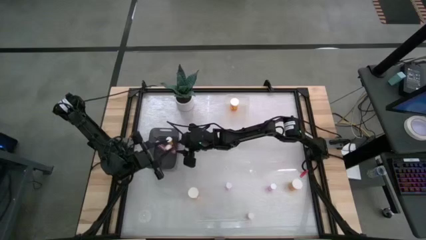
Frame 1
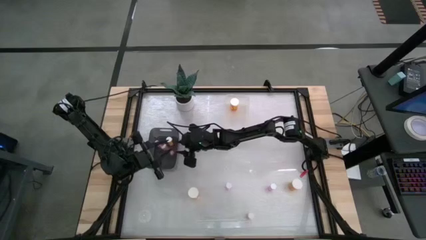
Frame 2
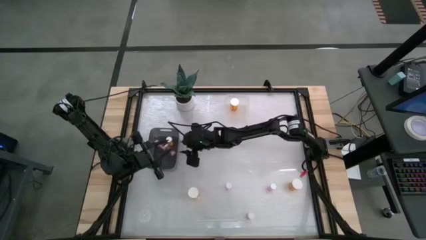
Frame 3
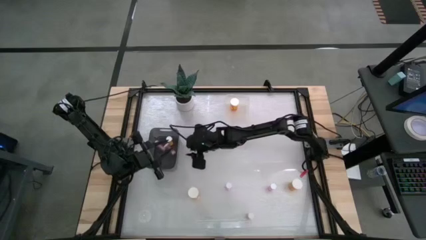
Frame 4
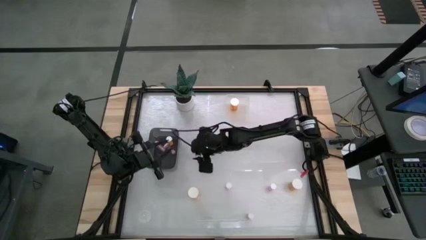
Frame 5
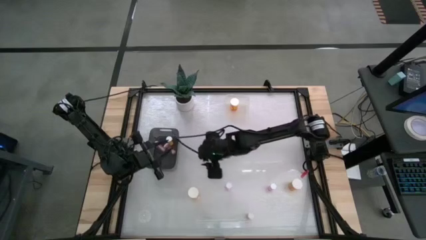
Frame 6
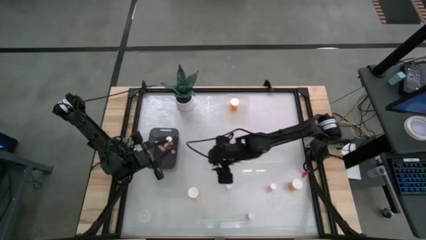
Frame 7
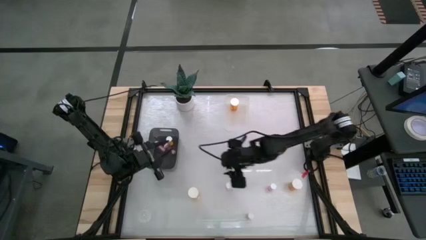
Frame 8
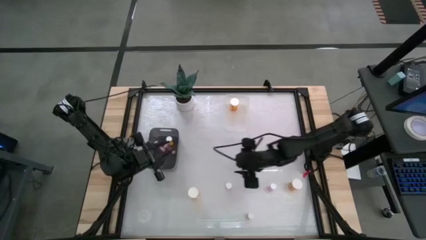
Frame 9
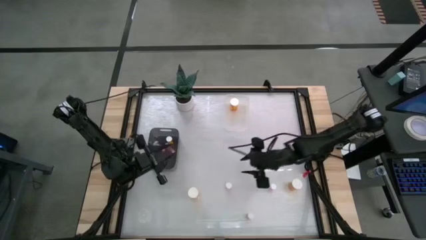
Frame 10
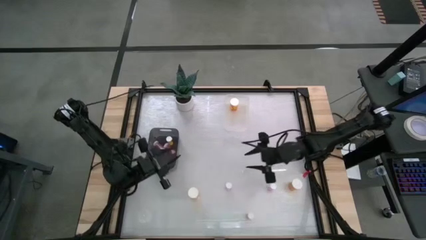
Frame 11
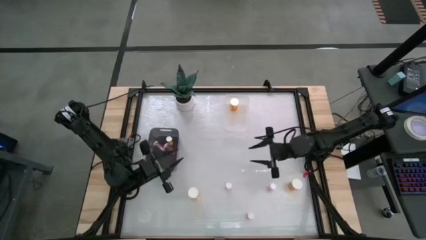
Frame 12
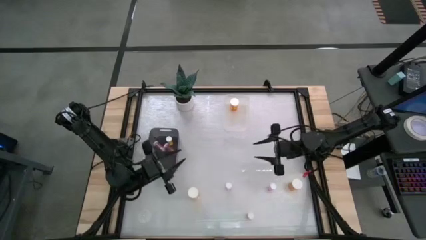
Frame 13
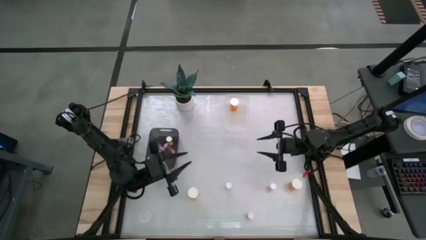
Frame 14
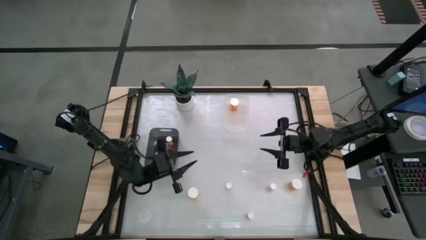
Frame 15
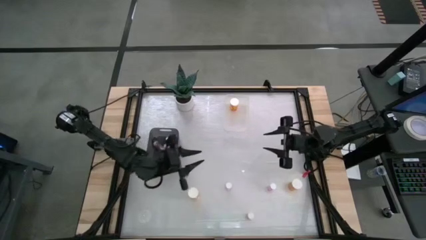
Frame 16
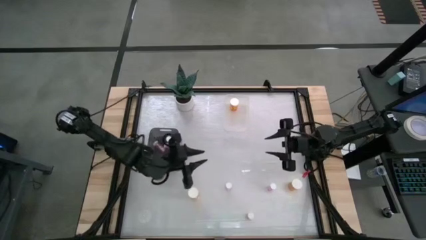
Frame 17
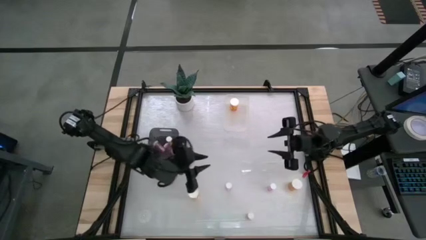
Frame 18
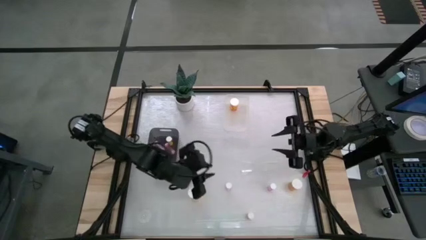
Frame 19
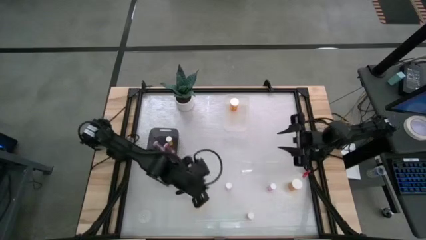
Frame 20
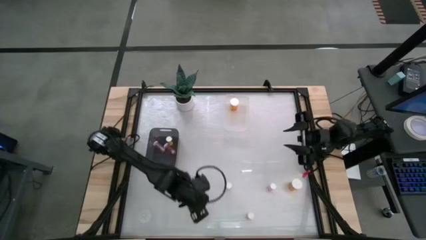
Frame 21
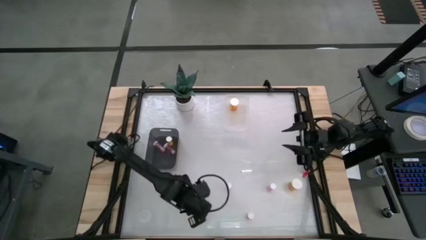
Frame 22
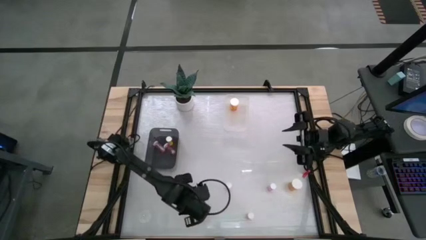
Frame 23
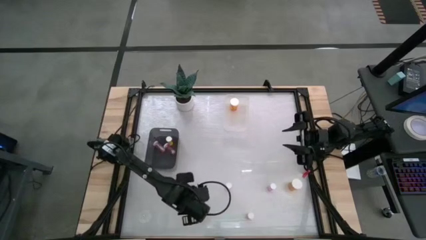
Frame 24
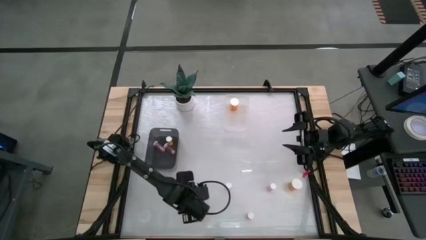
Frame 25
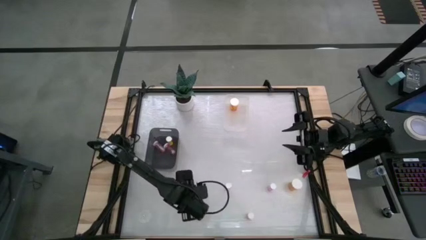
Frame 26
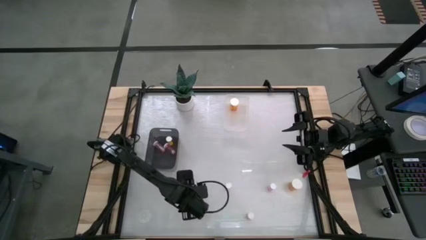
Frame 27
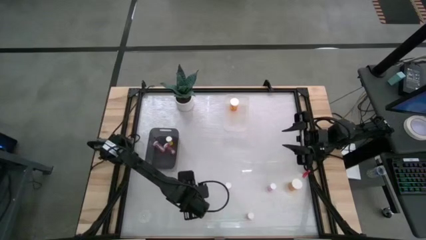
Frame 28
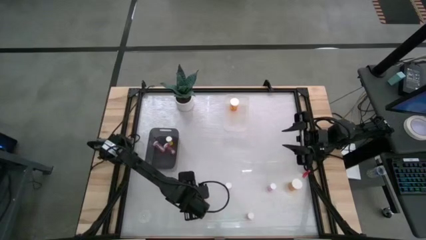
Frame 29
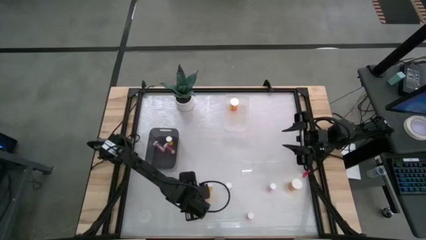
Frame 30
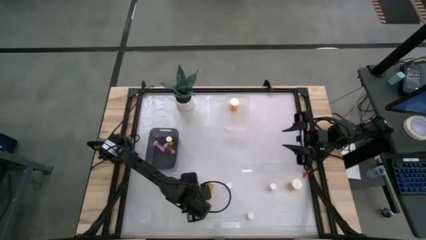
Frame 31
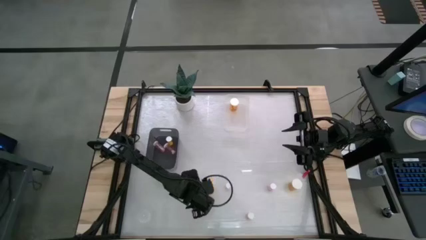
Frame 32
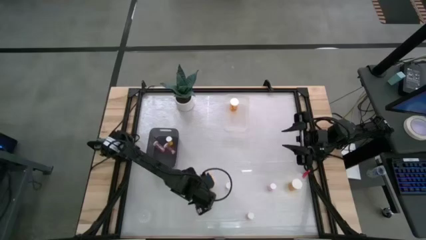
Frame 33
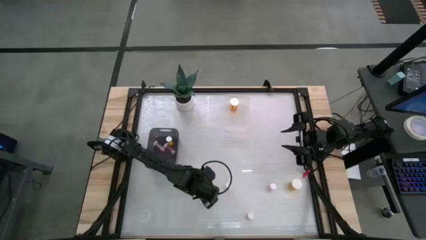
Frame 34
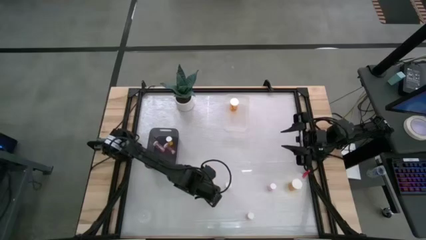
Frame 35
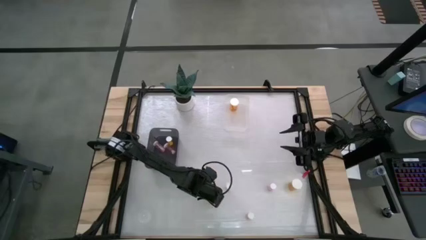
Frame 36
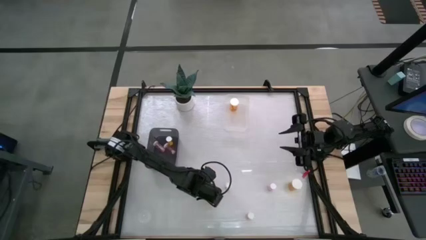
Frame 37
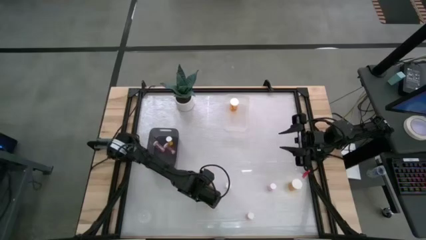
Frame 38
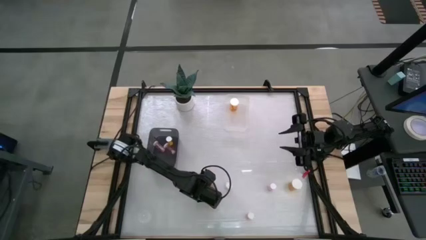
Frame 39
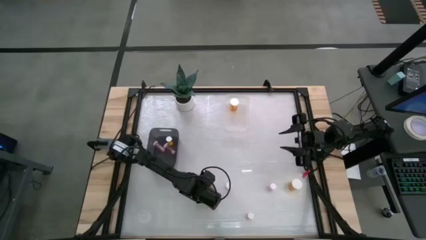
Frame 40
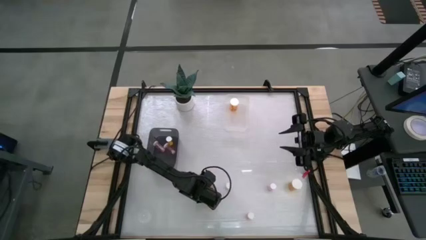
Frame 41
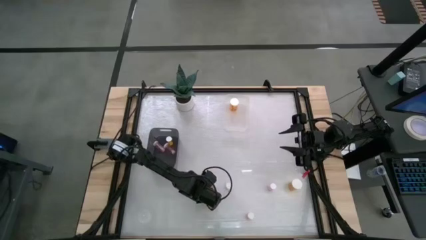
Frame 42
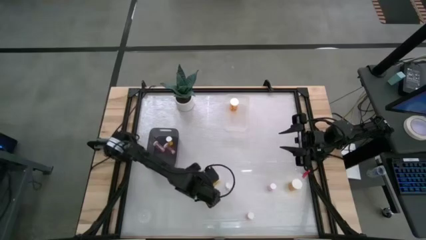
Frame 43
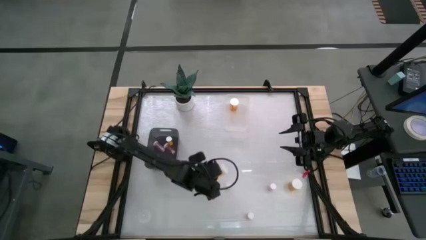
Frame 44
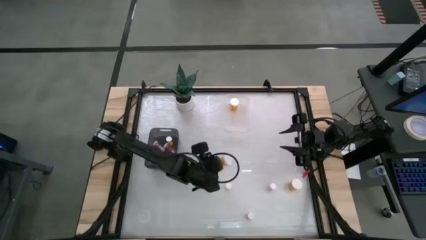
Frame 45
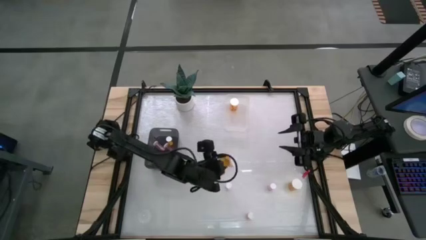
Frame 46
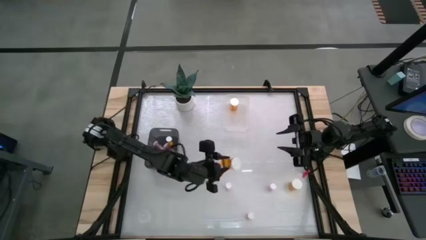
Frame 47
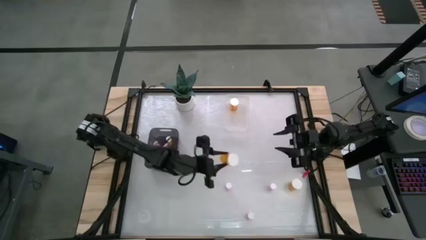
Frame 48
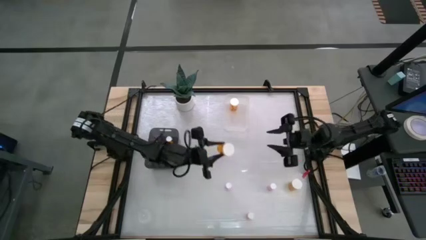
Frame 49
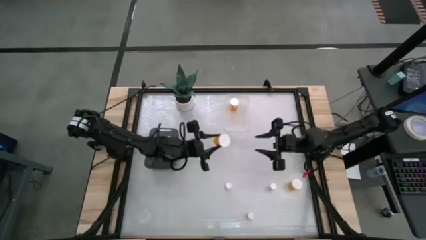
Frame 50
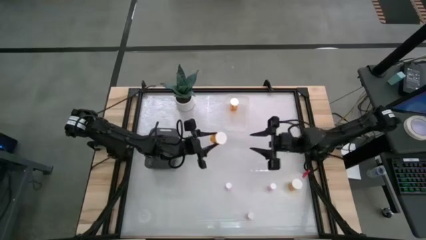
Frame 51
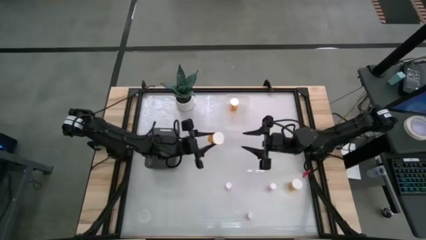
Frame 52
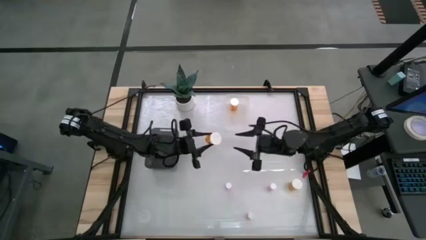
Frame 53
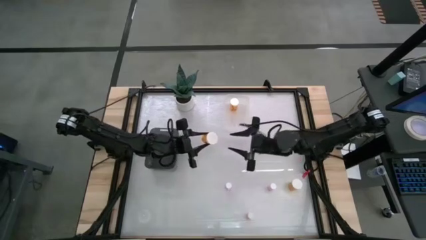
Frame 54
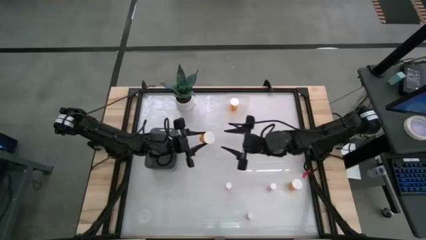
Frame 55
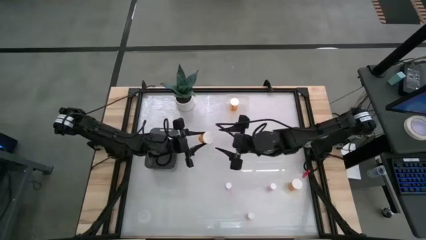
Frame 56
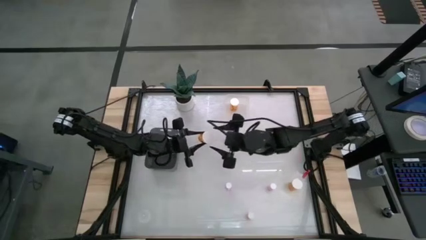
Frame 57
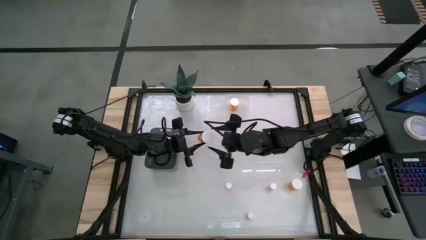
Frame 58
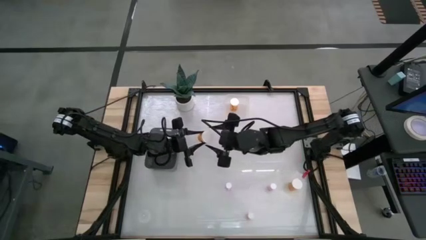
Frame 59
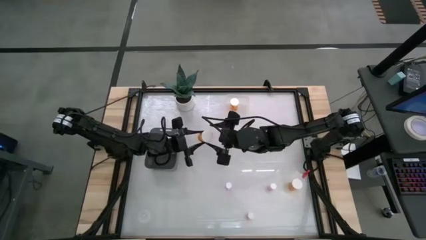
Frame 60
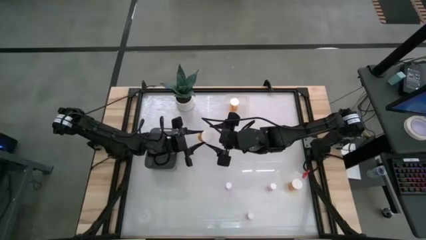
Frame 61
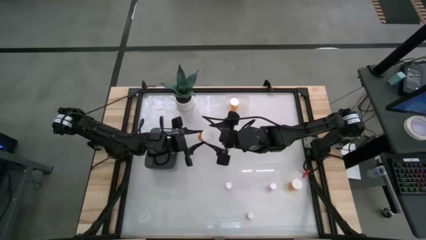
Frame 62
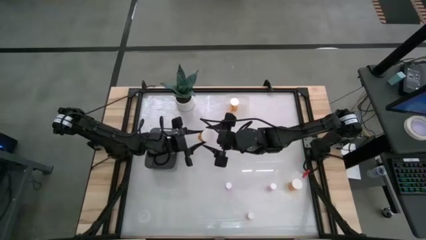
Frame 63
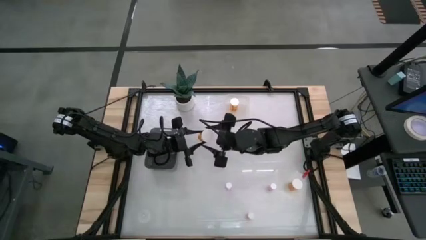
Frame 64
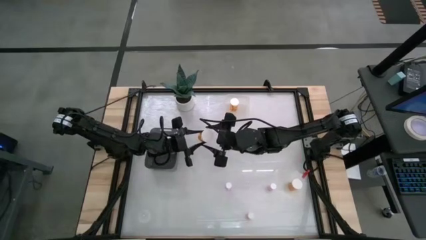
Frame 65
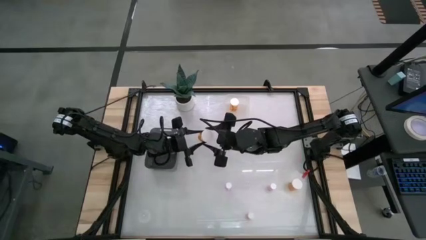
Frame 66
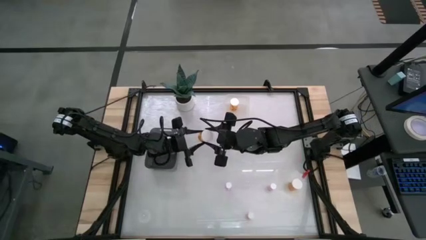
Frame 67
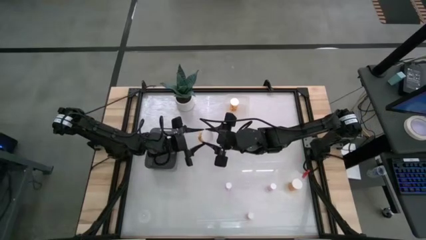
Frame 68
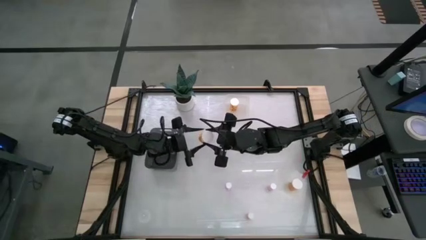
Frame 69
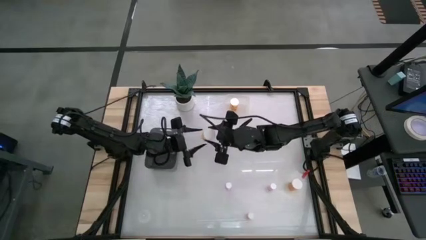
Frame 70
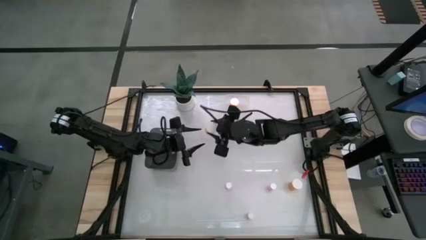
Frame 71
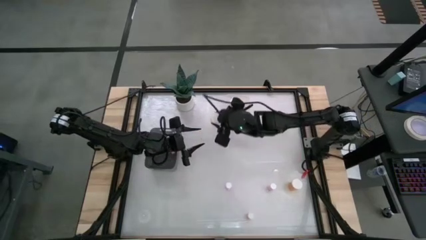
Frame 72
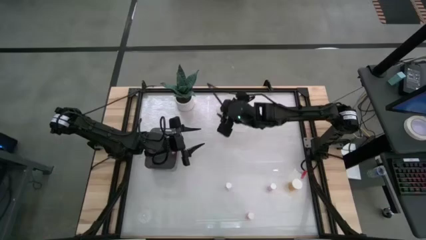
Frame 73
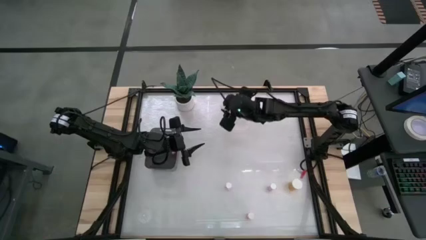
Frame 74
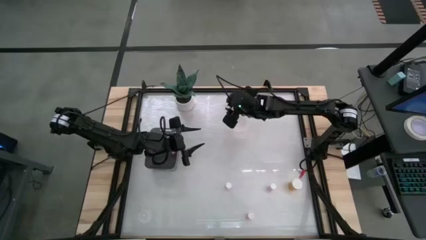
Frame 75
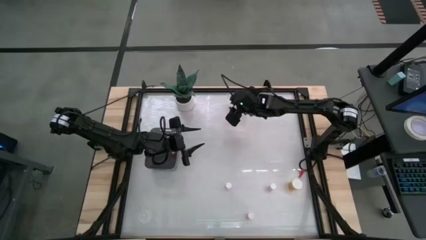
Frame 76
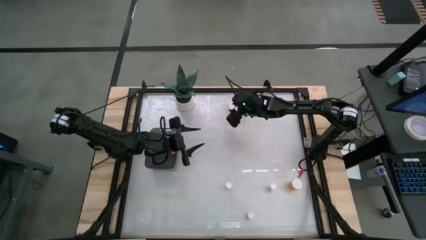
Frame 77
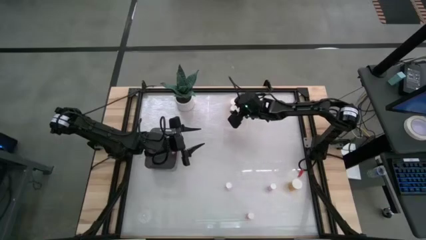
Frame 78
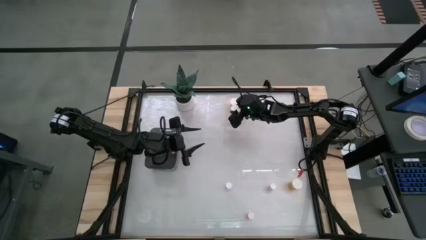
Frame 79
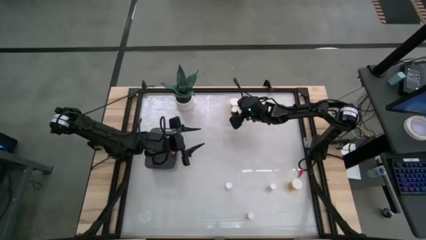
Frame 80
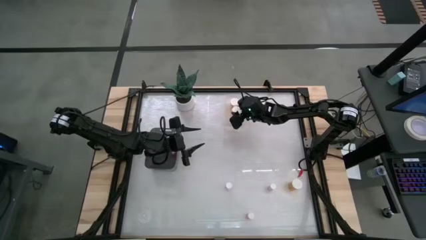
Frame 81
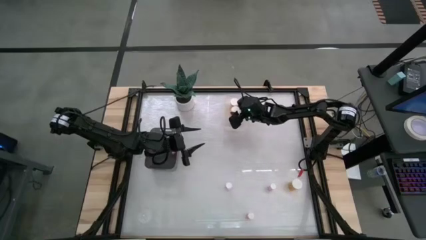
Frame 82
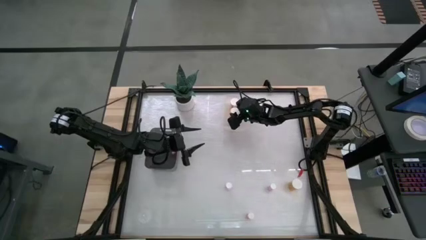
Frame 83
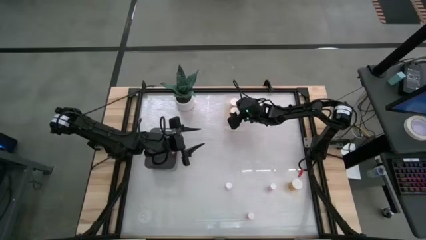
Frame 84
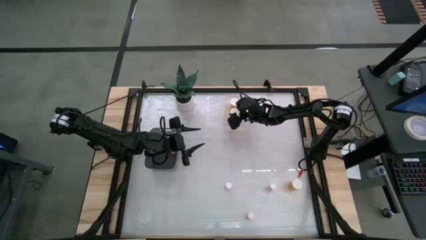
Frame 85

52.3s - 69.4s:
Task: Pick and place medicine bottles into bin by pill shape (circle, oval)
Put the left big orange pill bottle into the transparent bin
